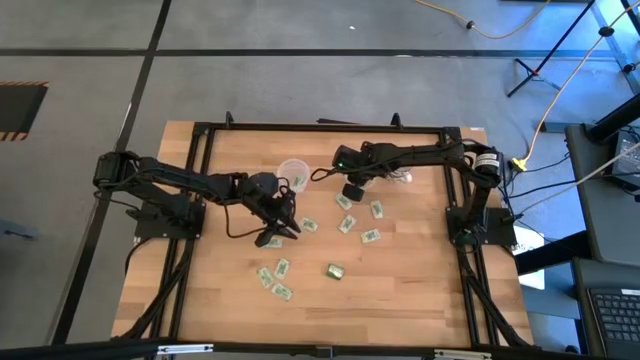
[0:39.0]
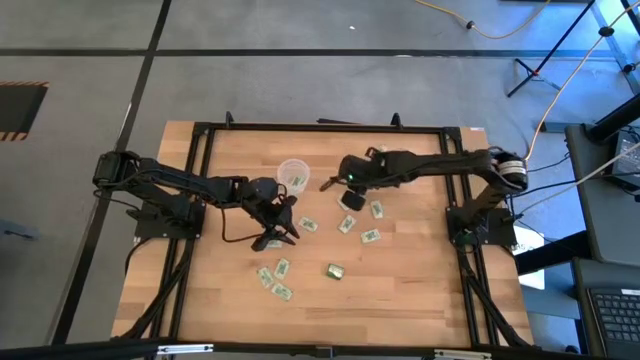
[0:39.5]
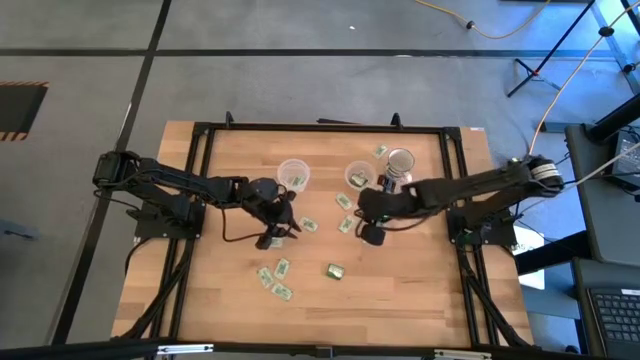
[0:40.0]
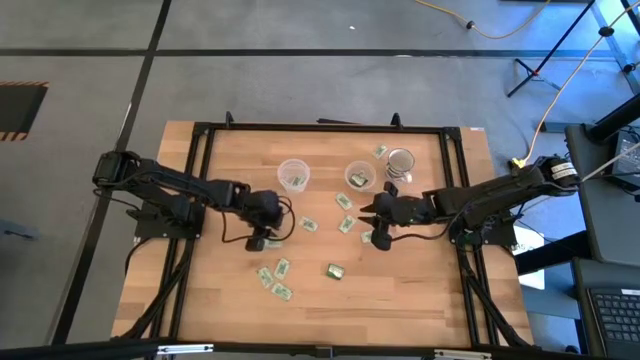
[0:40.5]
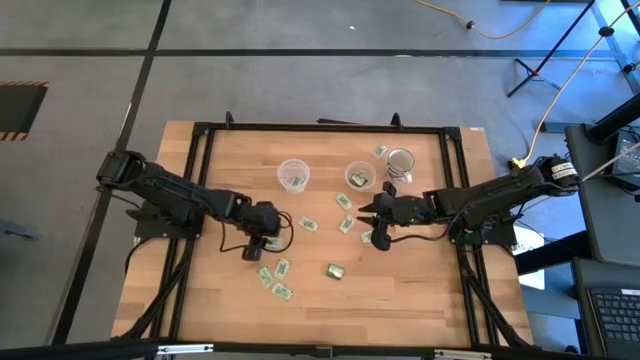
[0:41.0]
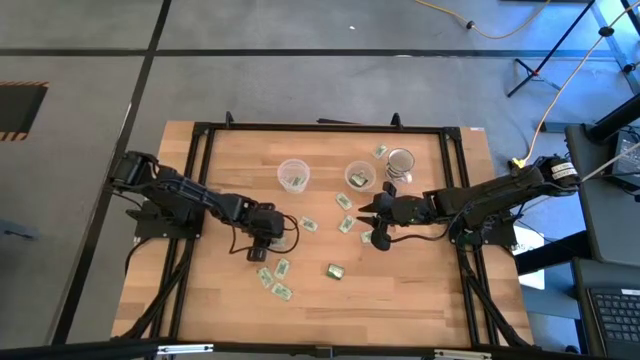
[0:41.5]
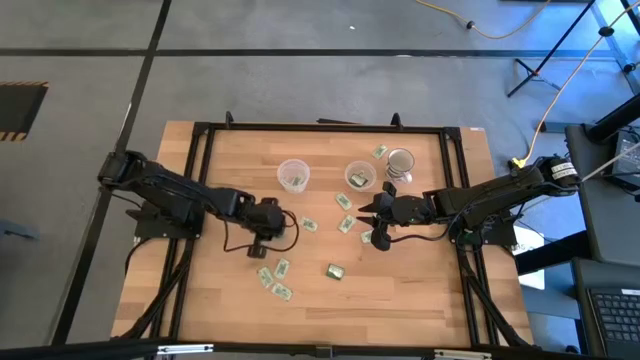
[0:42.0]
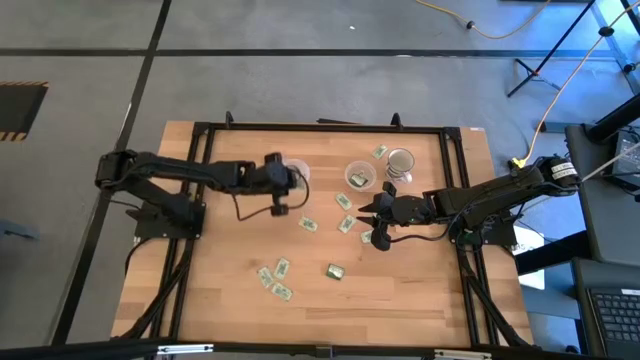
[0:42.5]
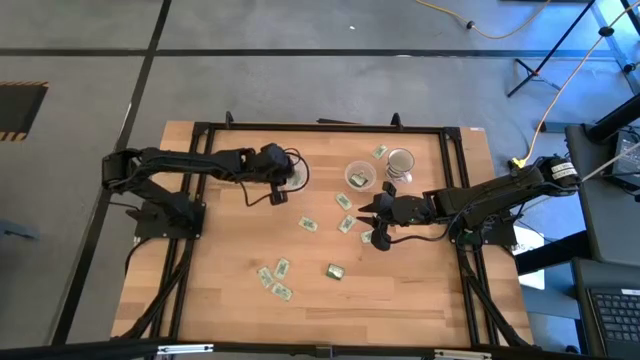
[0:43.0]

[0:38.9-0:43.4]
Task: Pick and place Stevia / Truvia into bins
Put the white stevia packet into the large transparent container

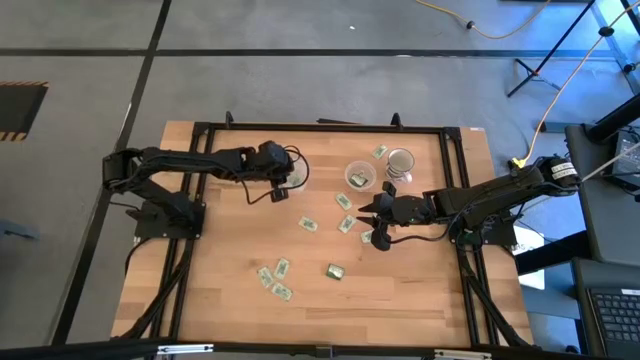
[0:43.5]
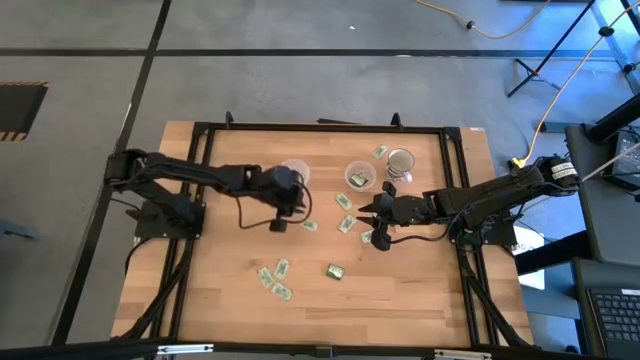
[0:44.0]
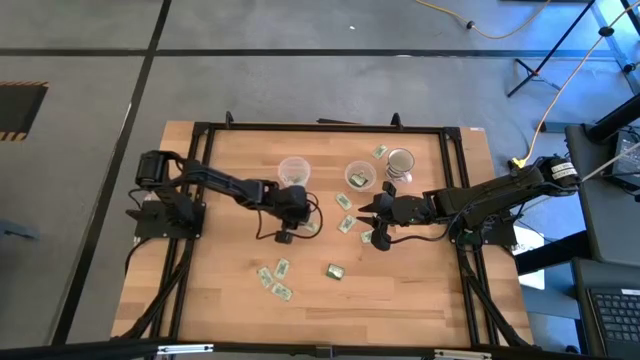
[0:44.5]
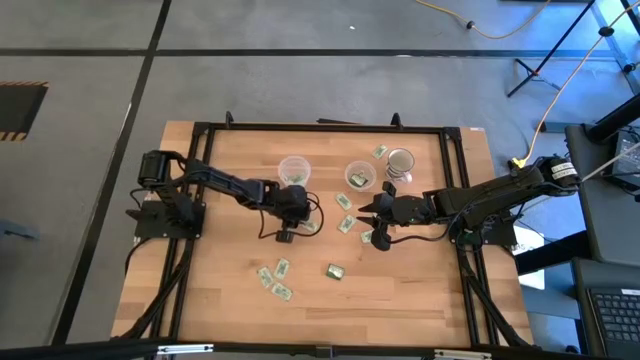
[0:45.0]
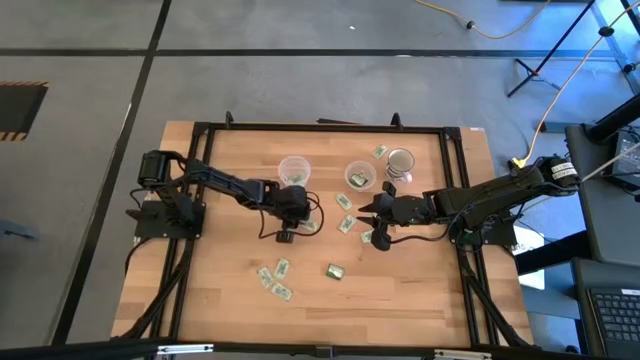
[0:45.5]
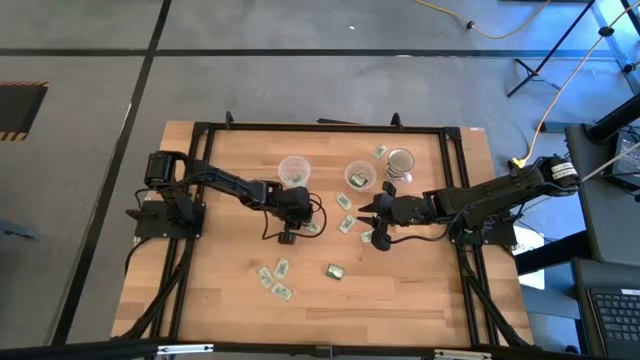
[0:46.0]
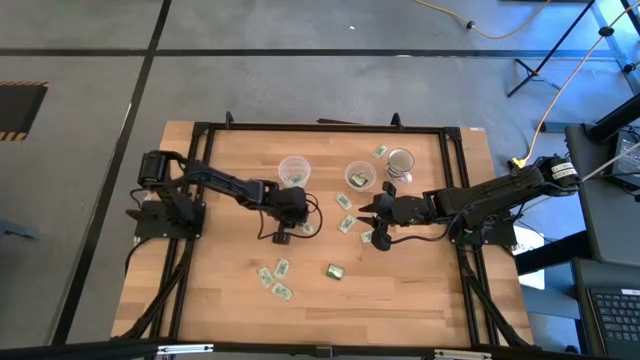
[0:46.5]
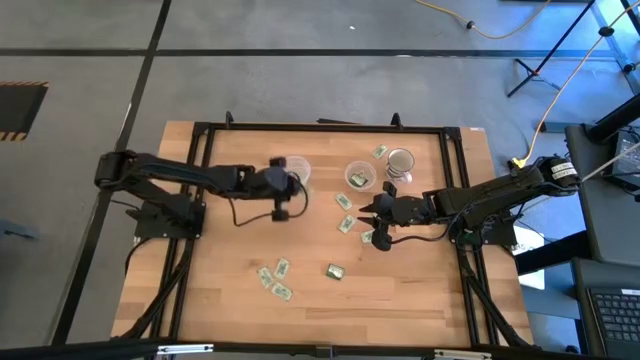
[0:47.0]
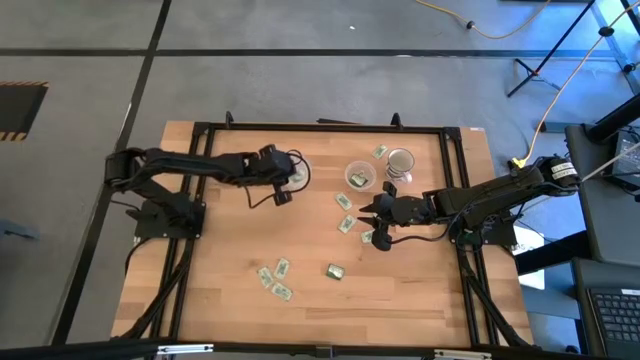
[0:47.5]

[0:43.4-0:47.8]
Put the white stevia packet into the large transparent container

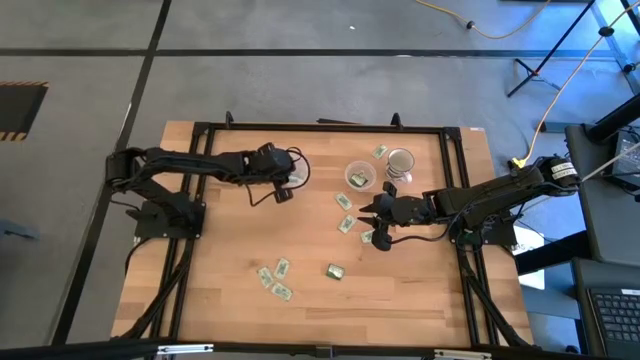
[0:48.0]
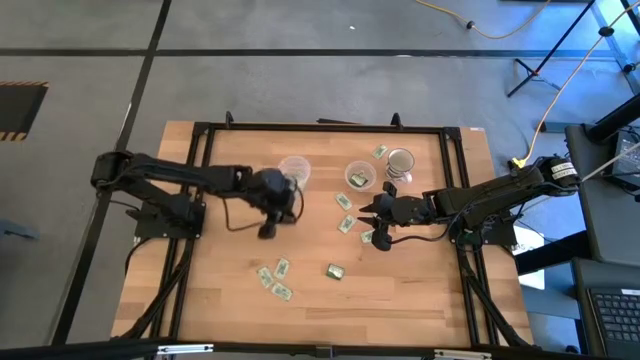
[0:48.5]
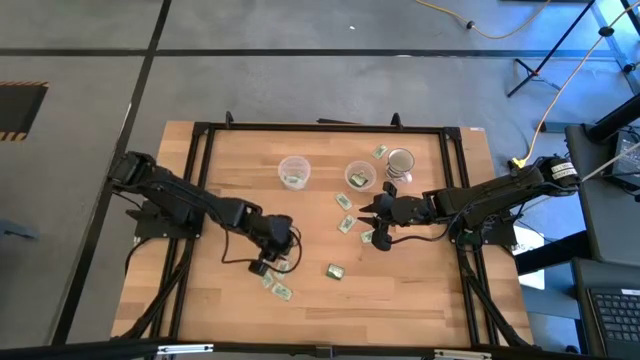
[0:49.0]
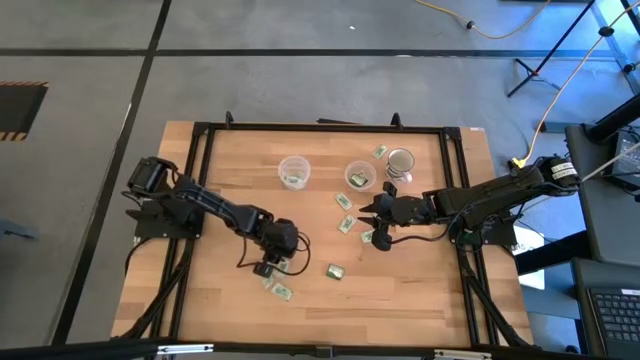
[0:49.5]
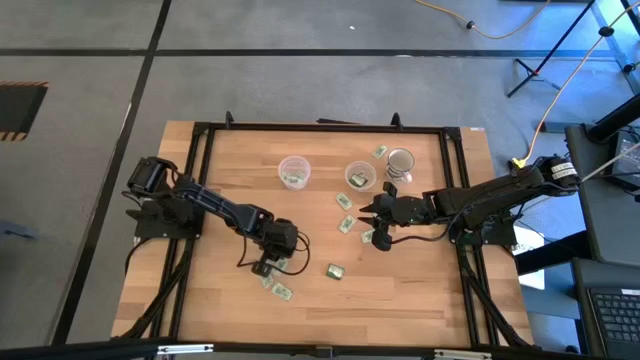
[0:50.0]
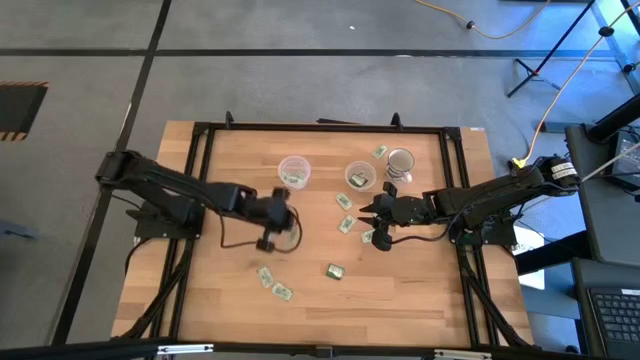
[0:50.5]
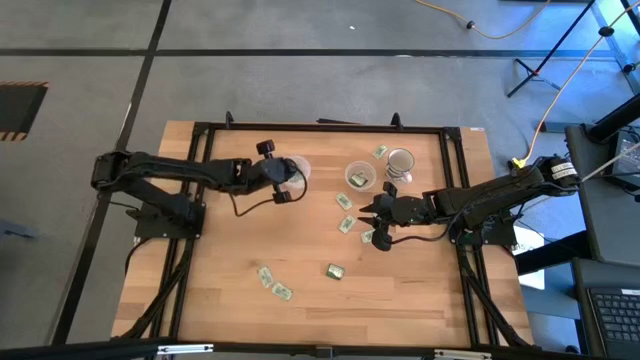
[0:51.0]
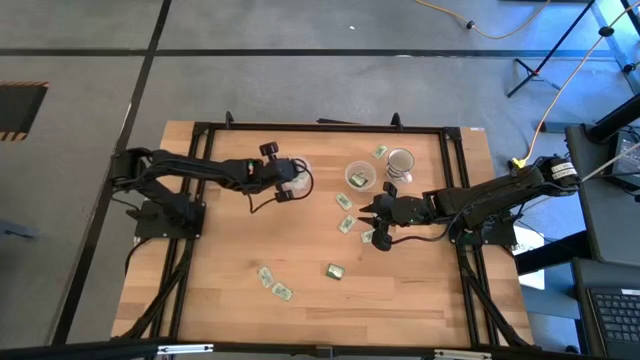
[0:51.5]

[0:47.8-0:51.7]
Put the white stevia packet into the large transparent container

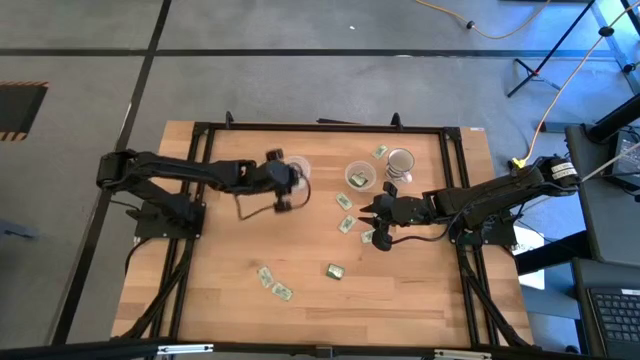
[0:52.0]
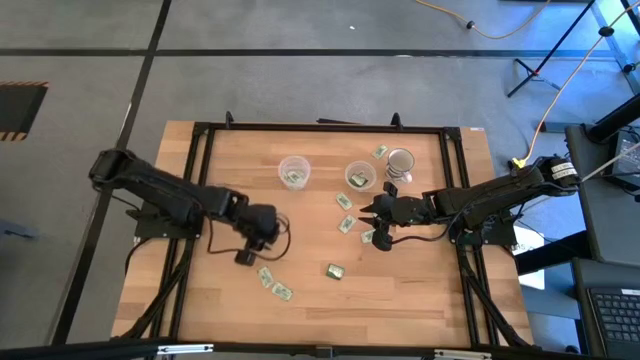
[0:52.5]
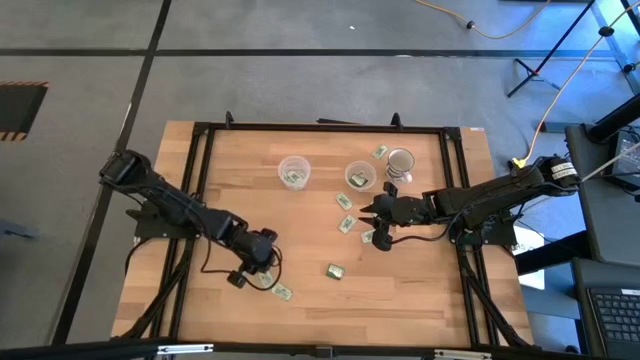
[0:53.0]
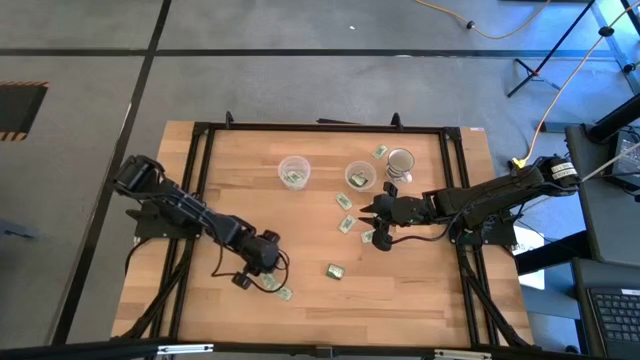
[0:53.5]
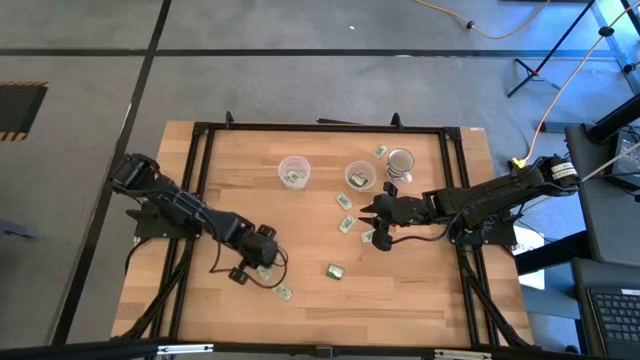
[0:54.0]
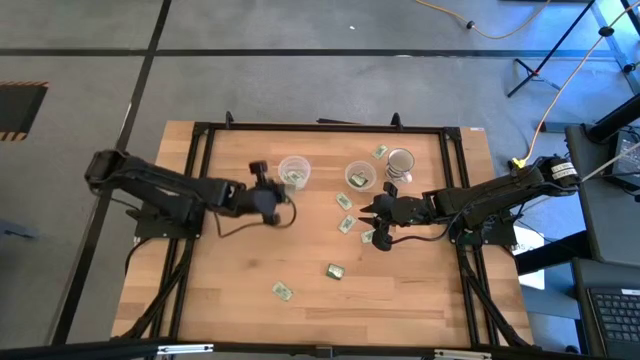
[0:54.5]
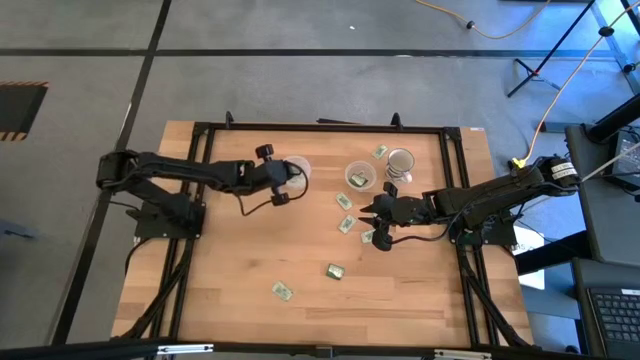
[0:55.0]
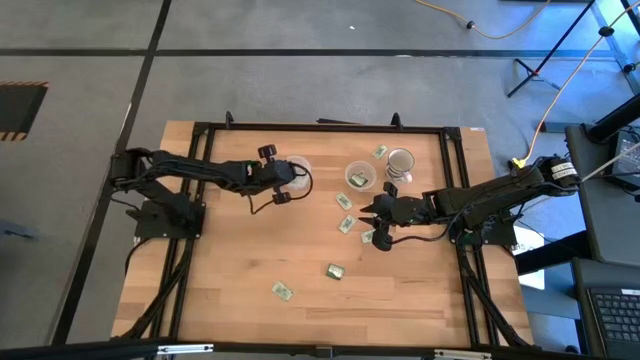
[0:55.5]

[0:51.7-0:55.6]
Put the white stevia packet into the large transparent container

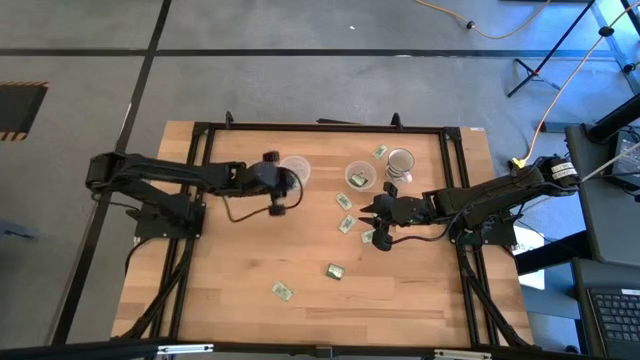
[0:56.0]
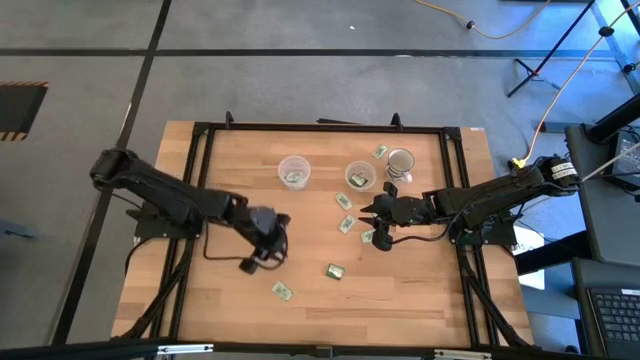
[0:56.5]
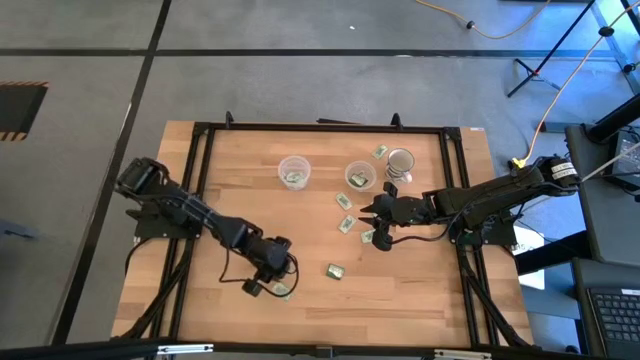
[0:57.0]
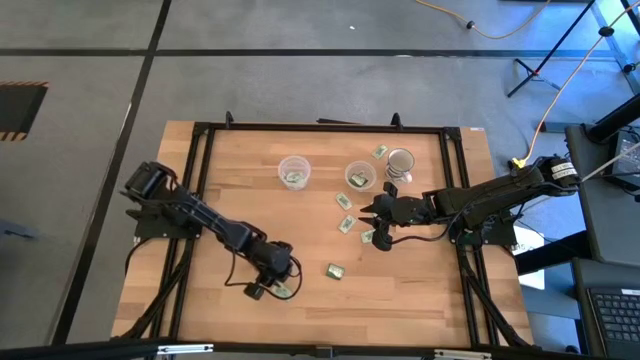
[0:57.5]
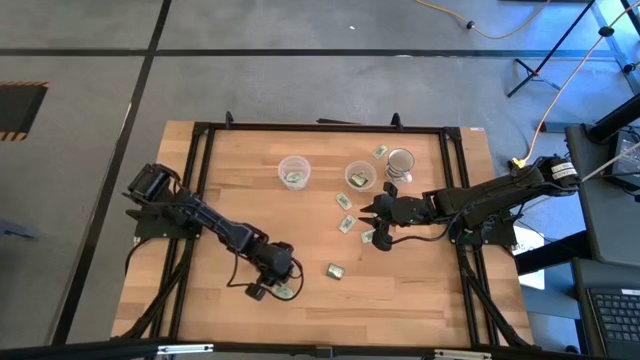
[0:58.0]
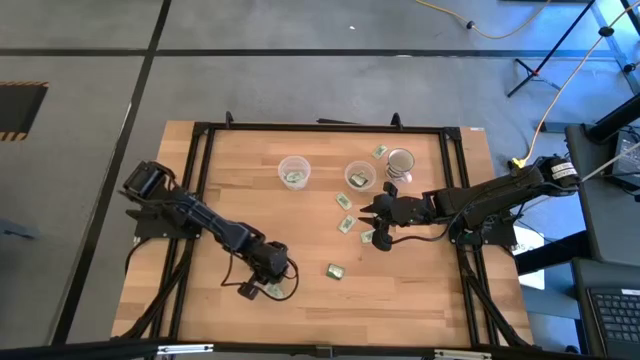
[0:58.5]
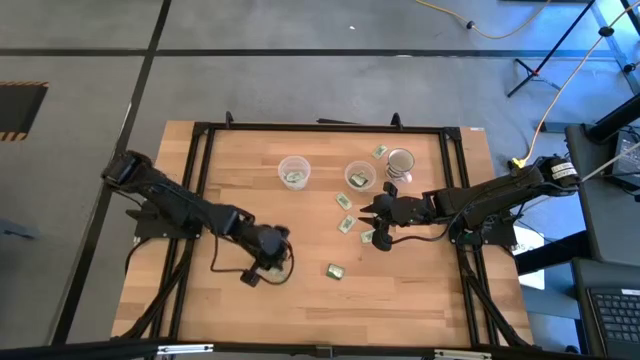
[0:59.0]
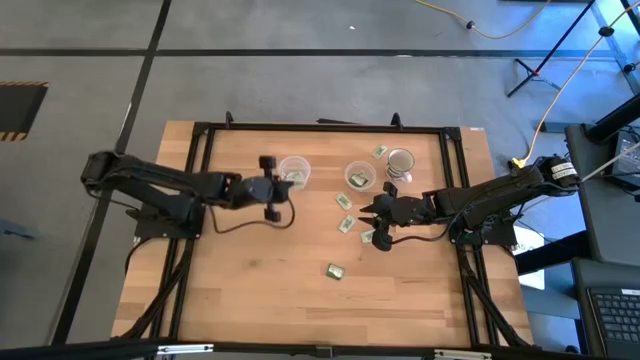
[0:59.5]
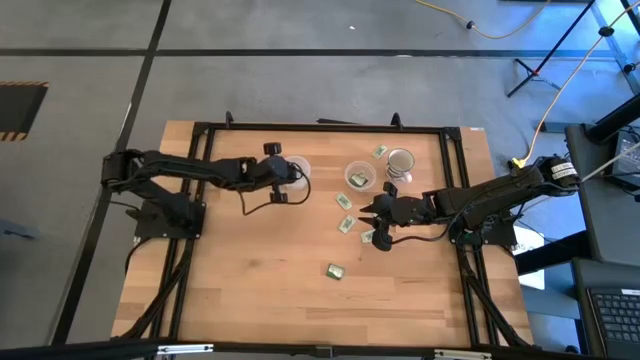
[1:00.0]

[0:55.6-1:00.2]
Put the white stevia packet into the large transparent container
